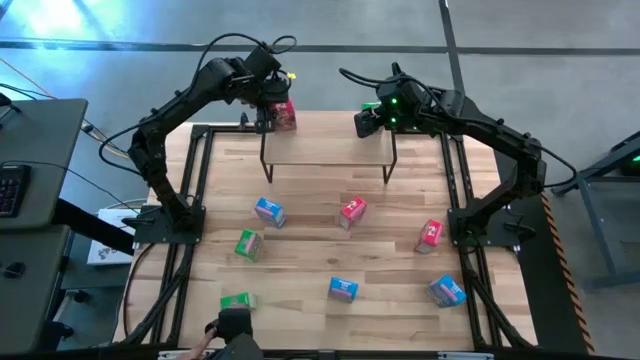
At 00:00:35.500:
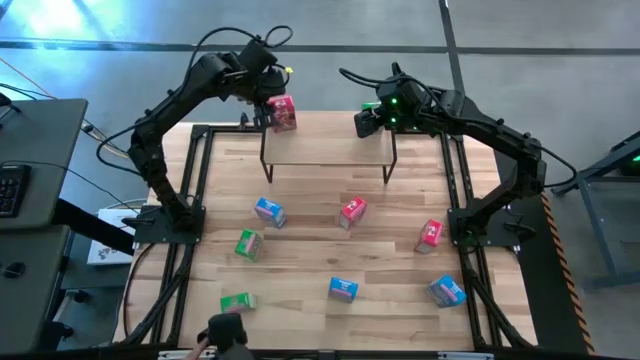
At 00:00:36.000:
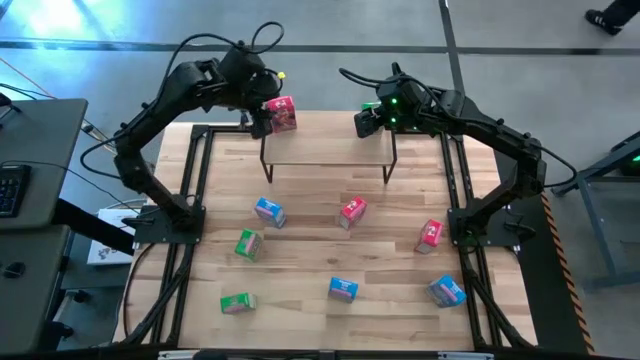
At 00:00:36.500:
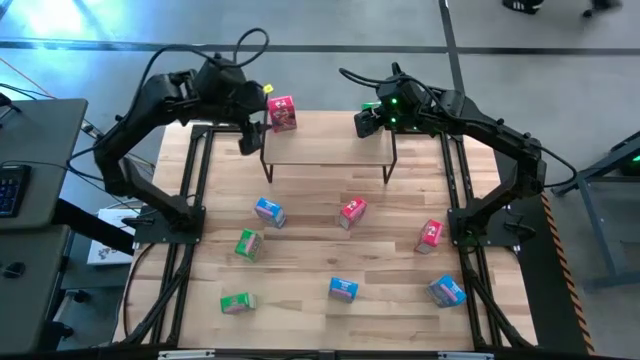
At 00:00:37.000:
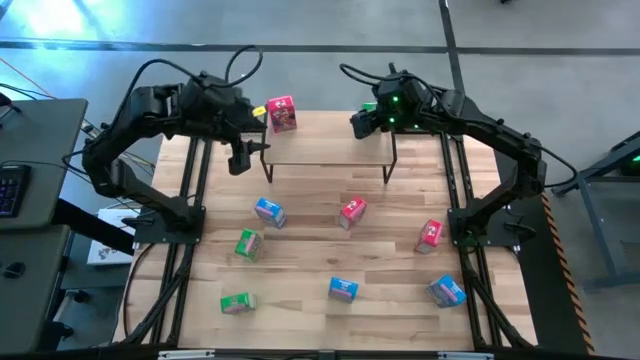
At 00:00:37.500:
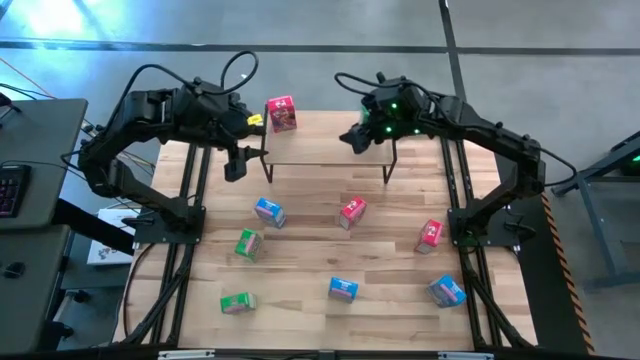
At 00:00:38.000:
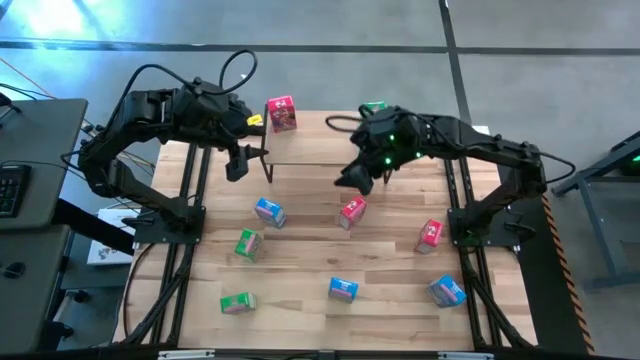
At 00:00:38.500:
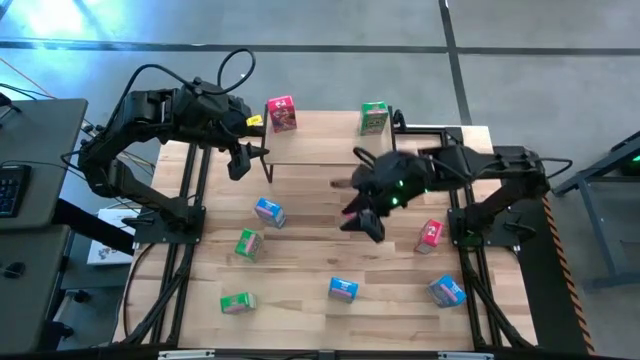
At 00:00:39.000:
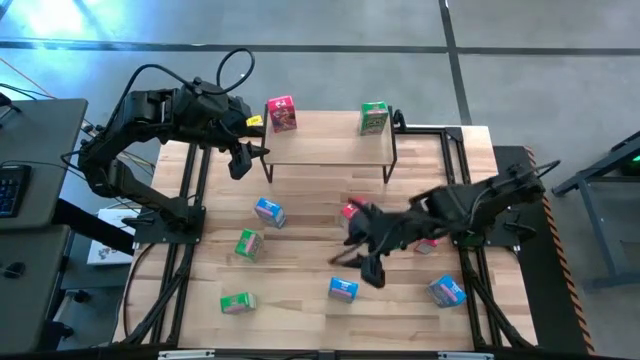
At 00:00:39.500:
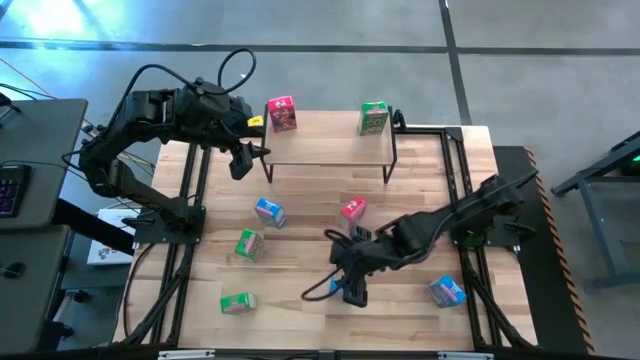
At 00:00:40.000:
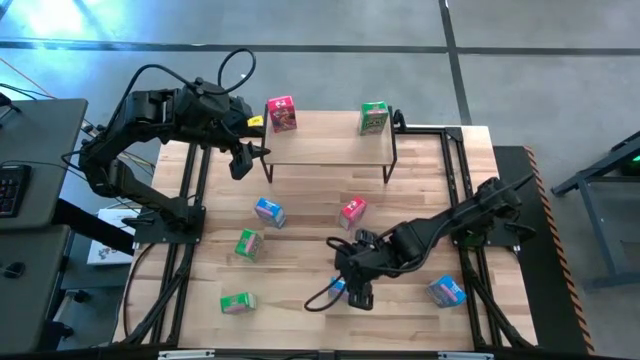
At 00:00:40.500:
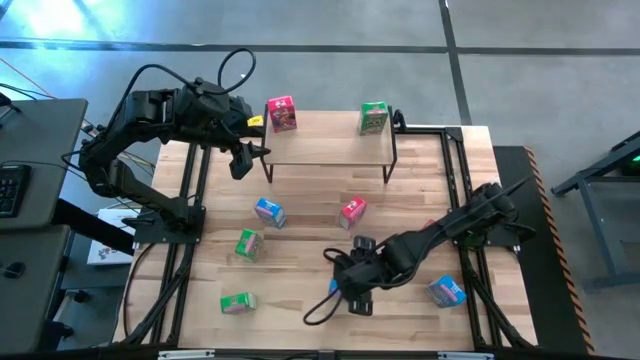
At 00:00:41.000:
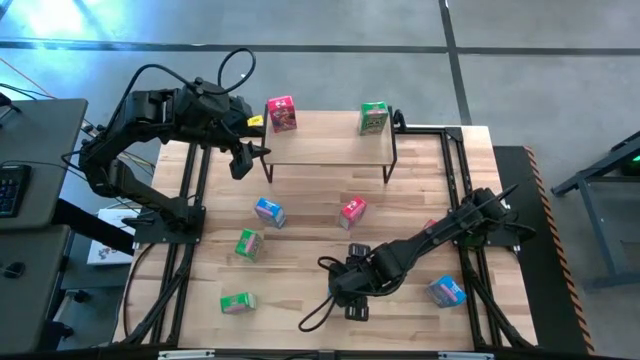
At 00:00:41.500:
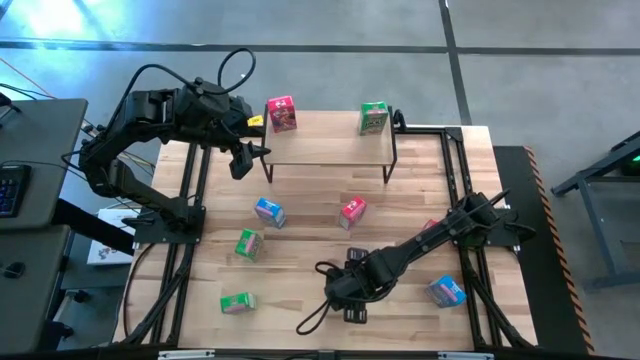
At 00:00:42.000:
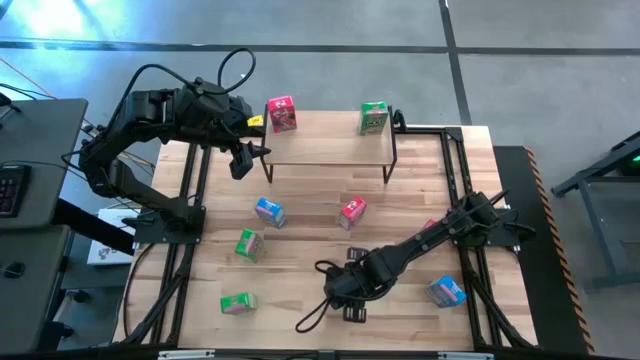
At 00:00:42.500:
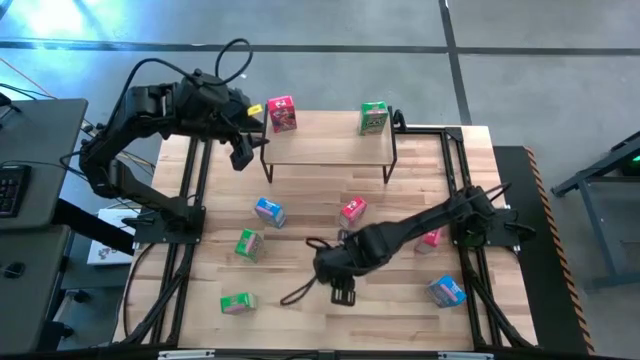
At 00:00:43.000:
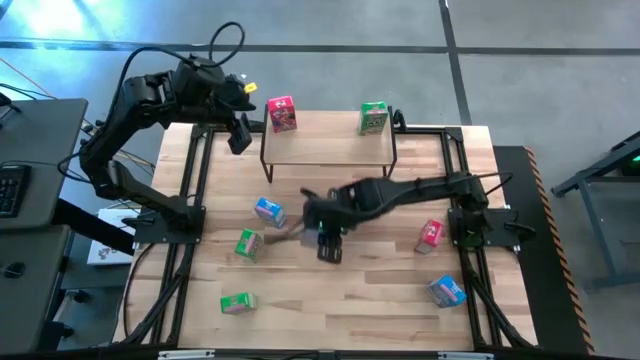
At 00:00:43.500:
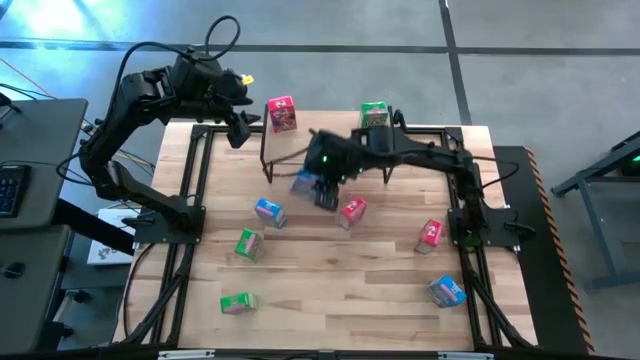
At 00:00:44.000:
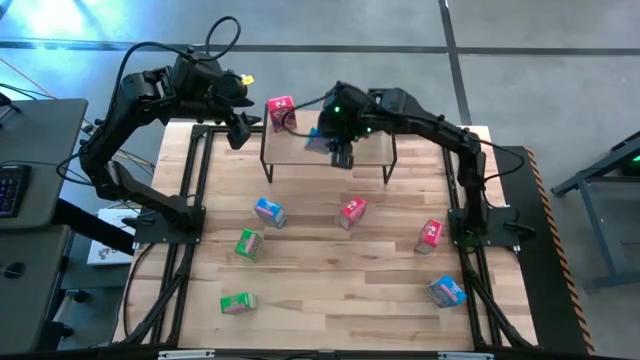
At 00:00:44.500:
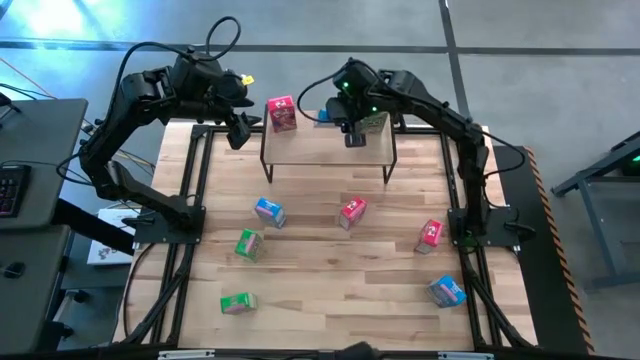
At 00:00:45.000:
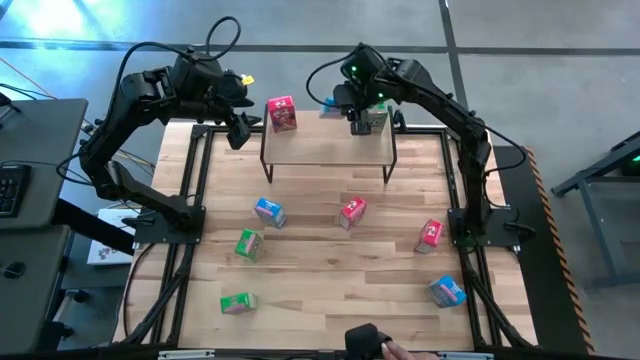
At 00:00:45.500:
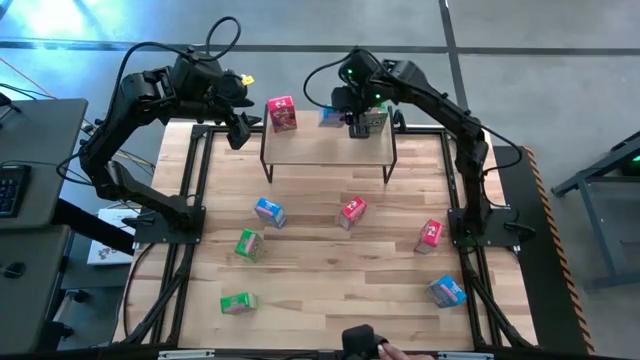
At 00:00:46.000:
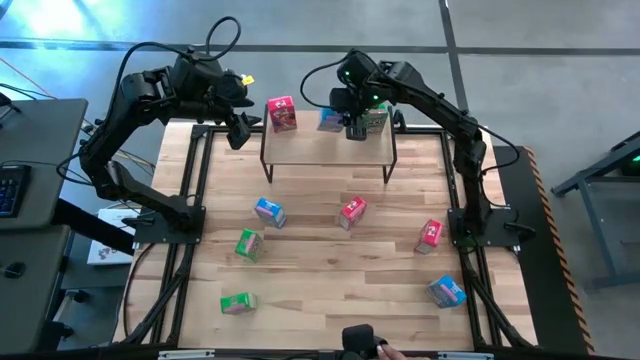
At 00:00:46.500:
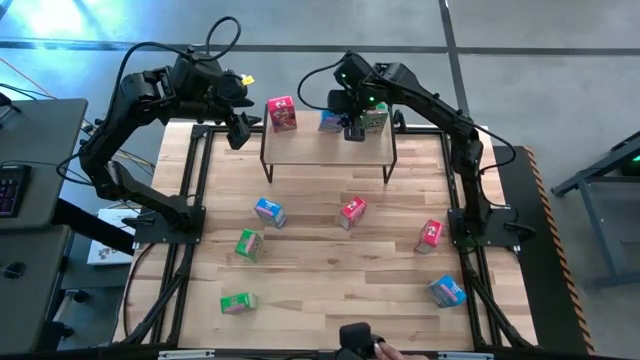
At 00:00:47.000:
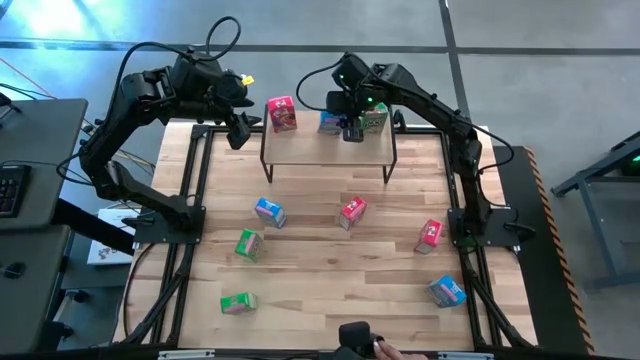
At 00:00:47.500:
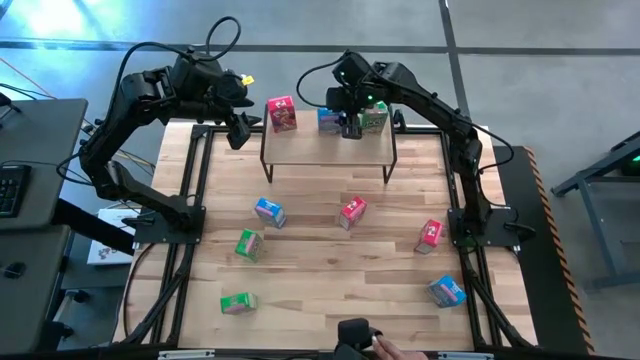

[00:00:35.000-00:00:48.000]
Task: Stack cereal on shelf
Put the center blue cereal box on the shelf

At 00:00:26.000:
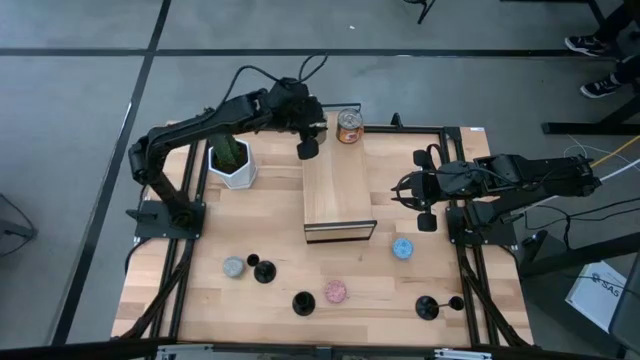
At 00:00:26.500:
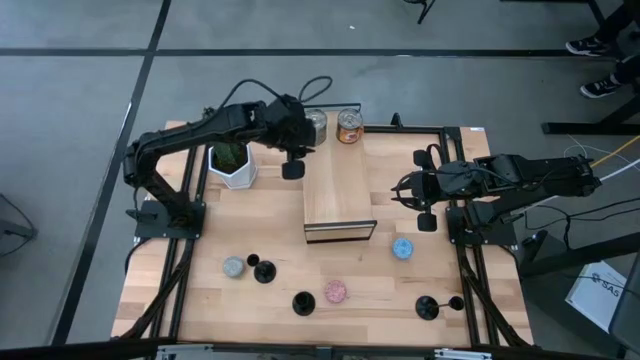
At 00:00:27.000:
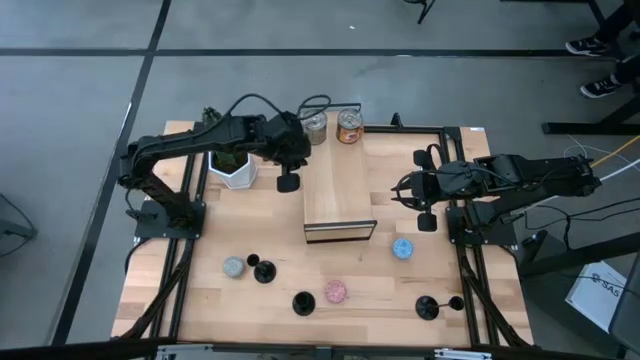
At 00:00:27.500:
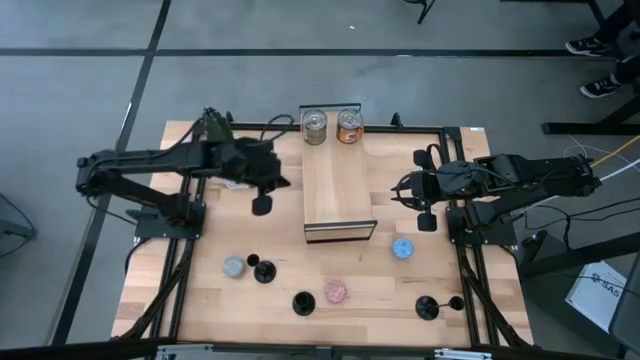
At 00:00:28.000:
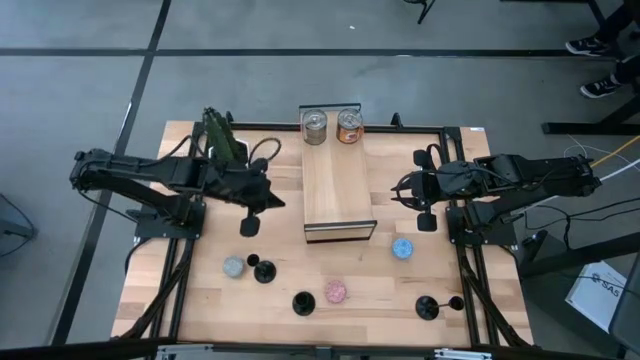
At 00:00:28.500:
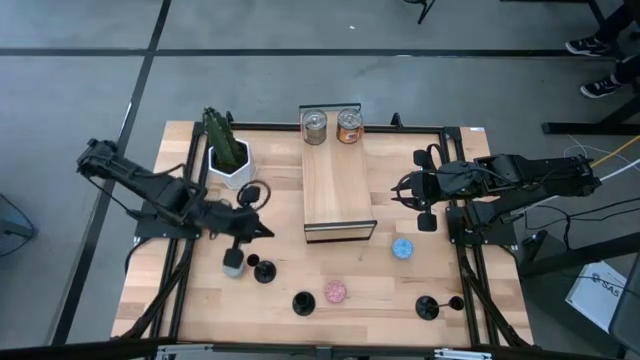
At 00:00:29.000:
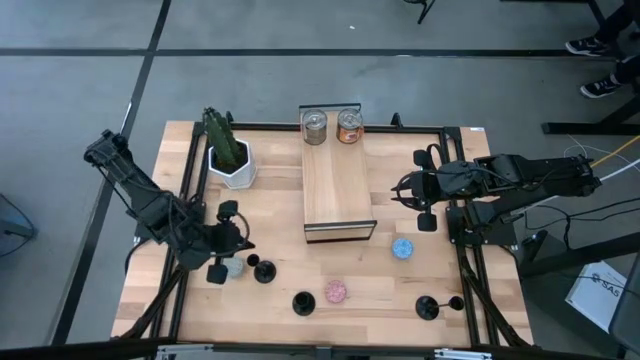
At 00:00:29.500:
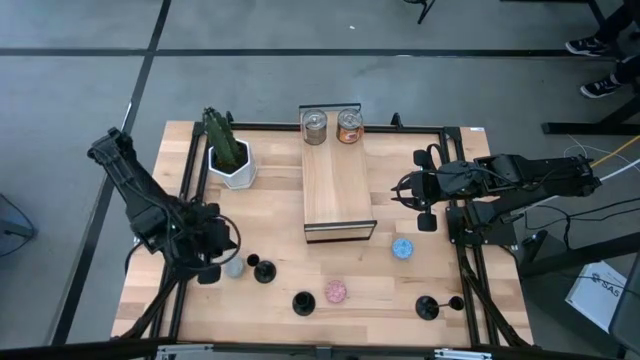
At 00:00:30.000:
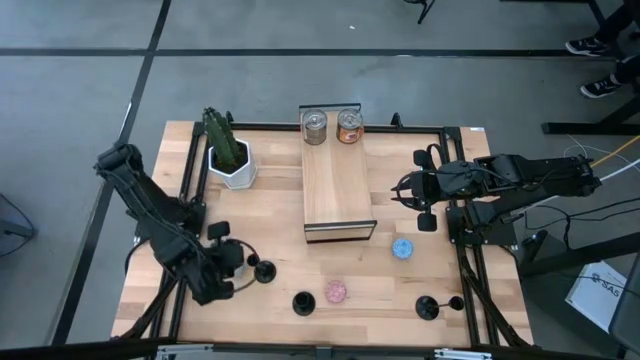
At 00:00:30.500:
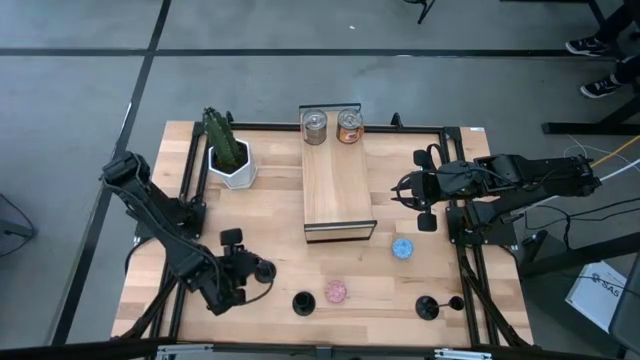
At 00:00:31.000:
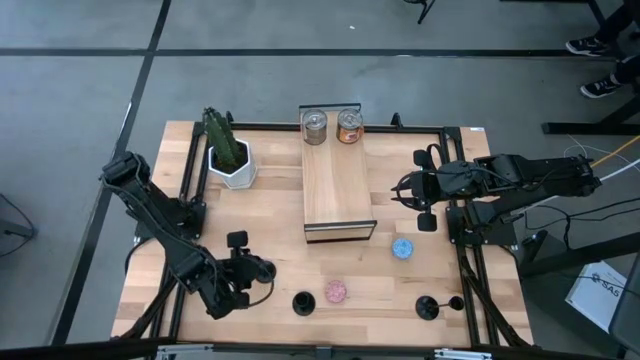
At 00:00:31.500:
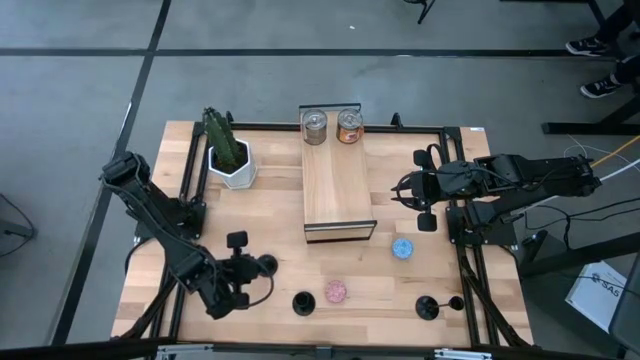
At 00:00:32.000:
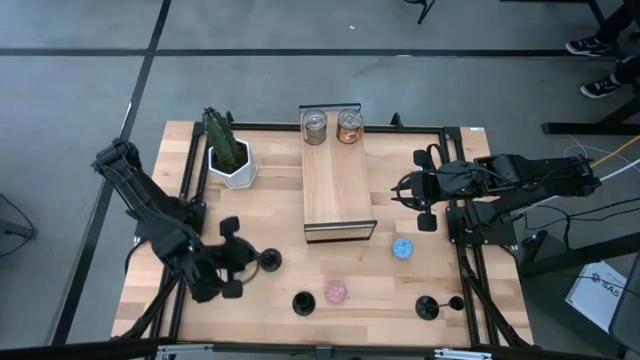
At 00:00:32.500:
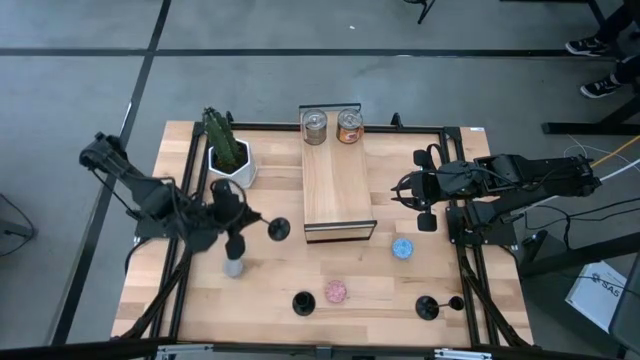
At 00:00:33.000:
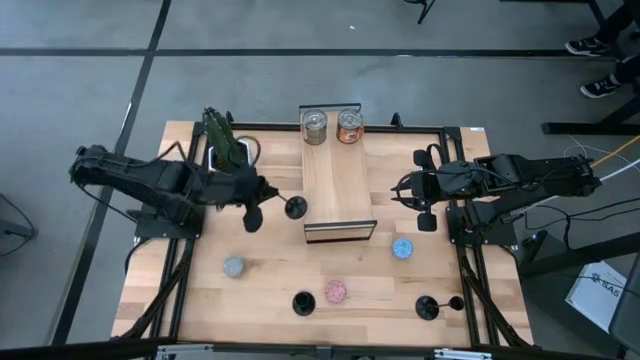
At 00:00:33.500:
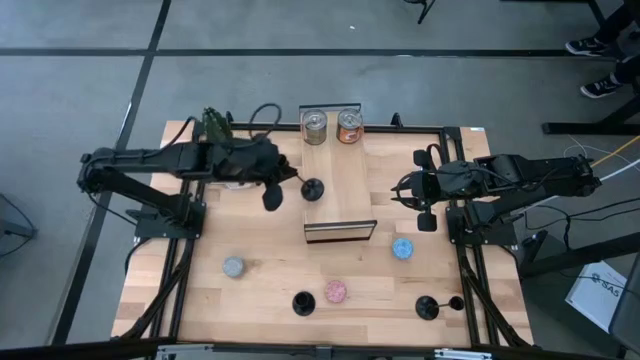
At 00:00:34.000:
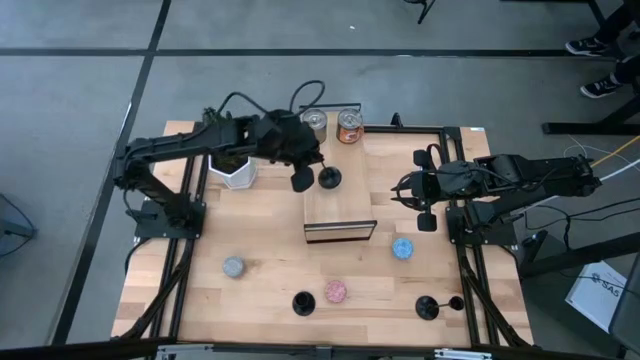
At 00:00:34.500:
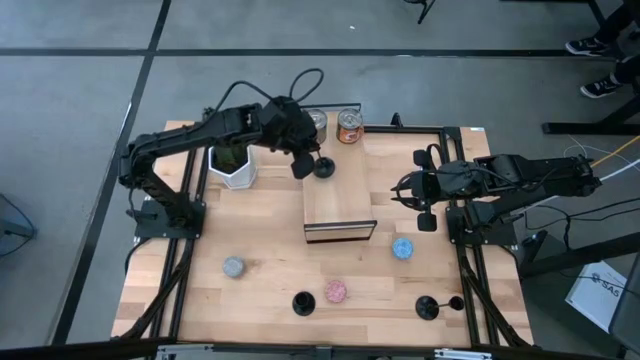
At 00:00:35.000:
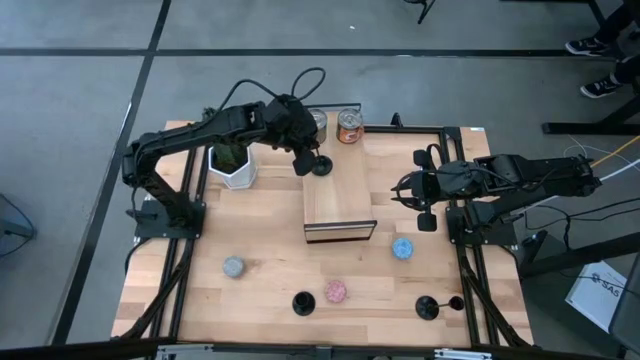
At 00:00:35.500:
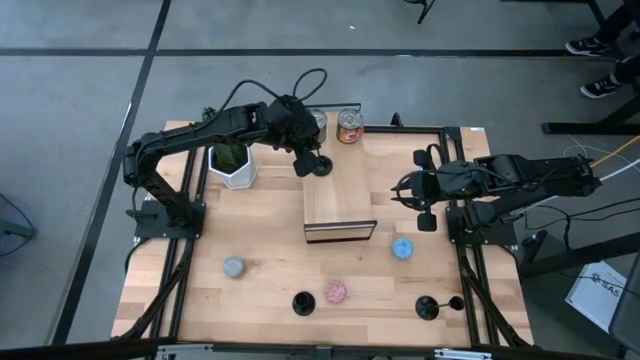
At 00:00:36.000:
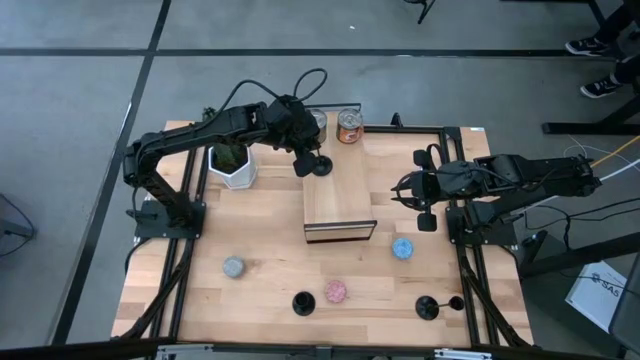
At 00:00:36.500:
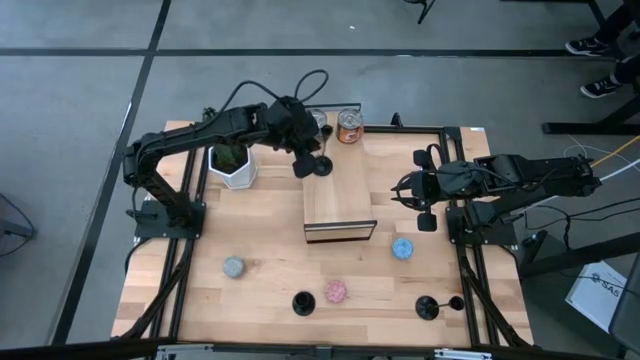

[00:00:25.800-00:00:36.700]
Task: Pick & Place candle stick holders
Put the top candle holder on the shelf
